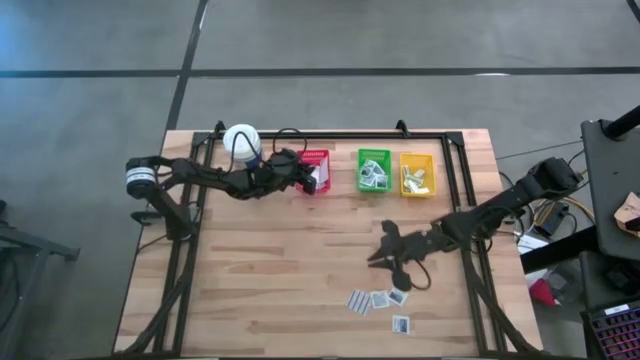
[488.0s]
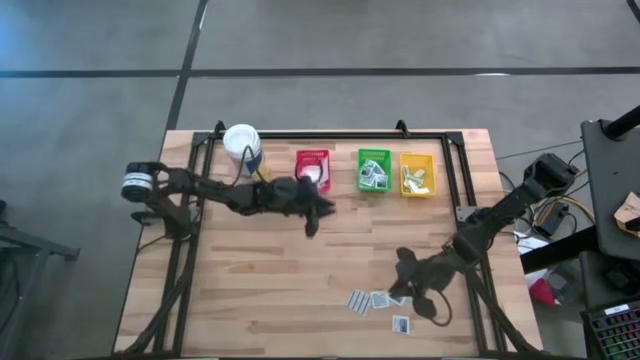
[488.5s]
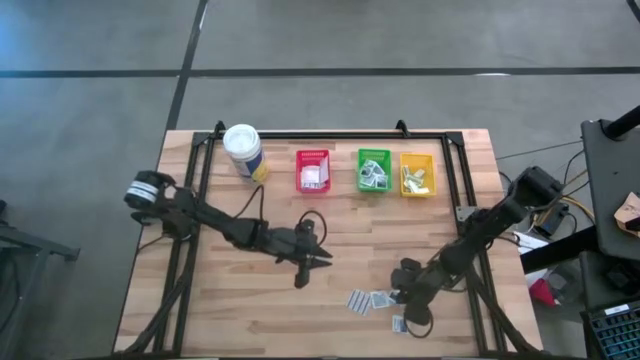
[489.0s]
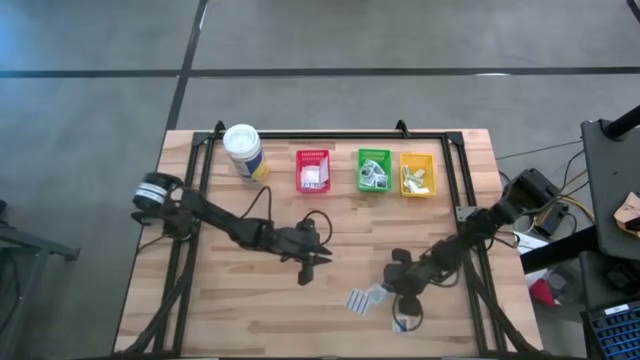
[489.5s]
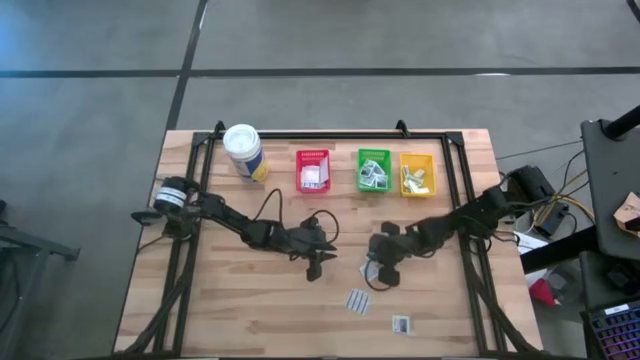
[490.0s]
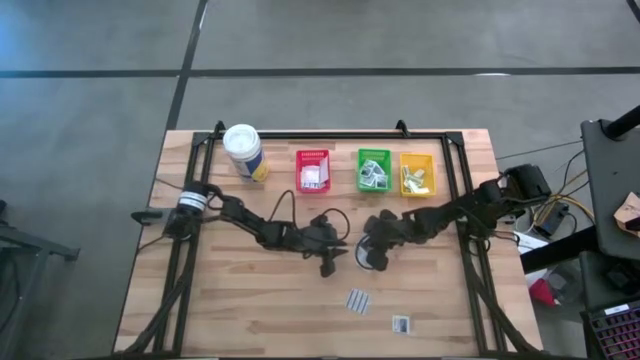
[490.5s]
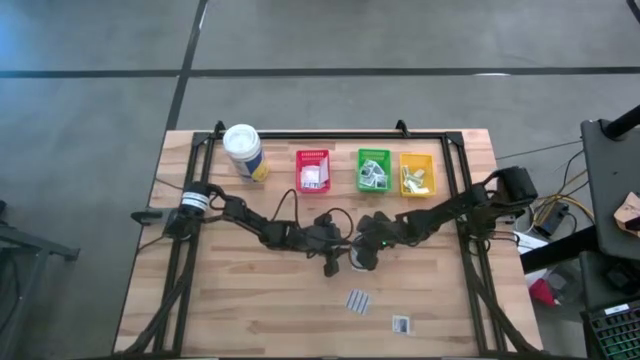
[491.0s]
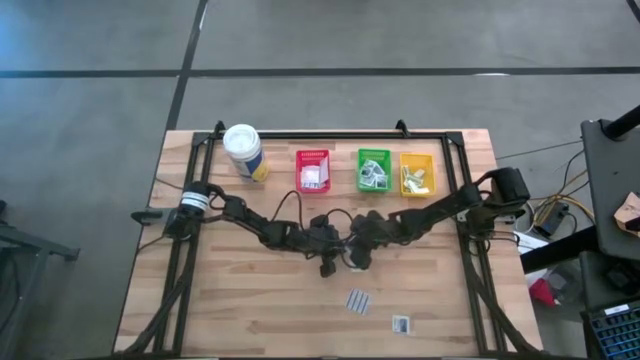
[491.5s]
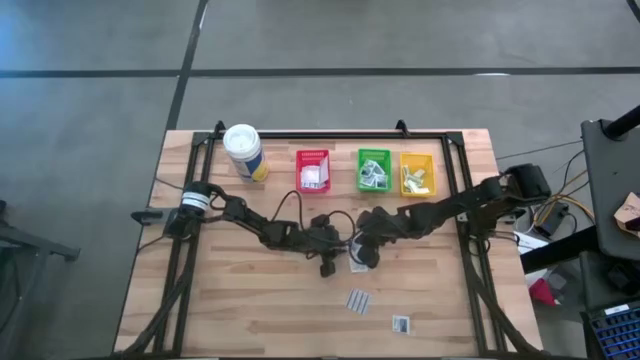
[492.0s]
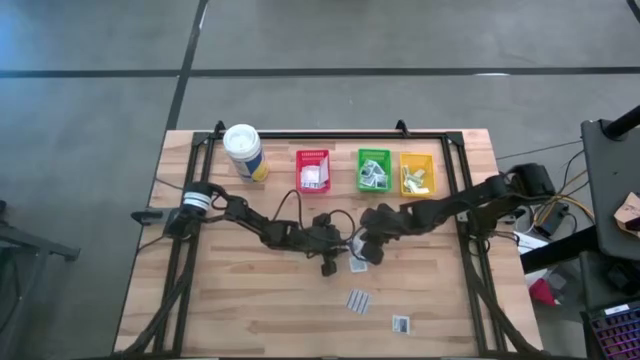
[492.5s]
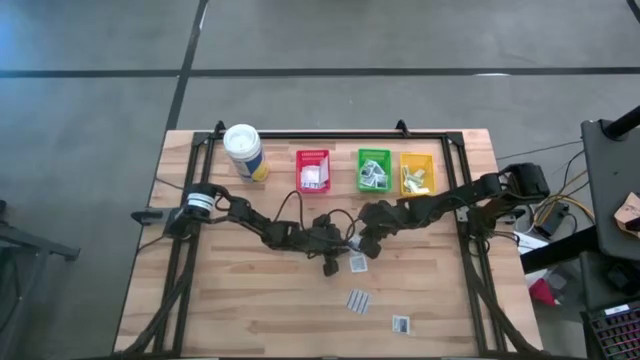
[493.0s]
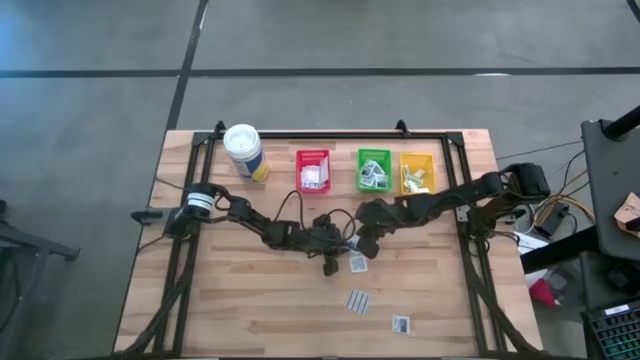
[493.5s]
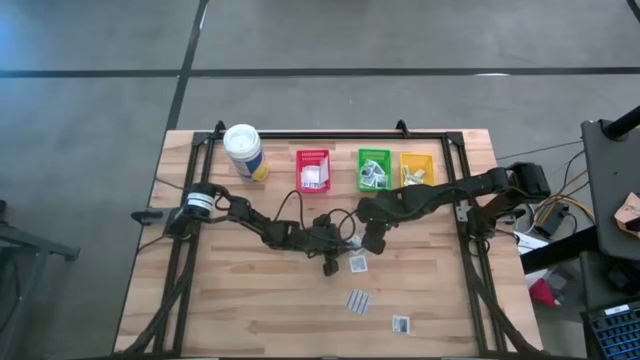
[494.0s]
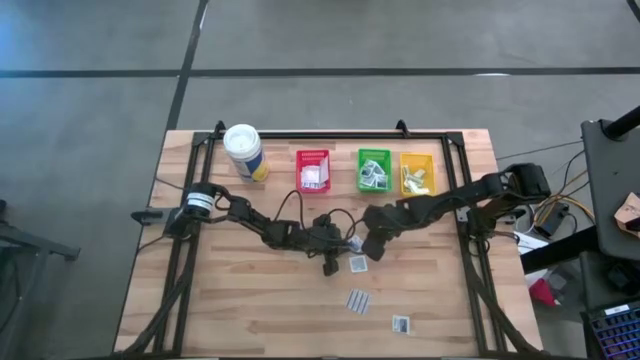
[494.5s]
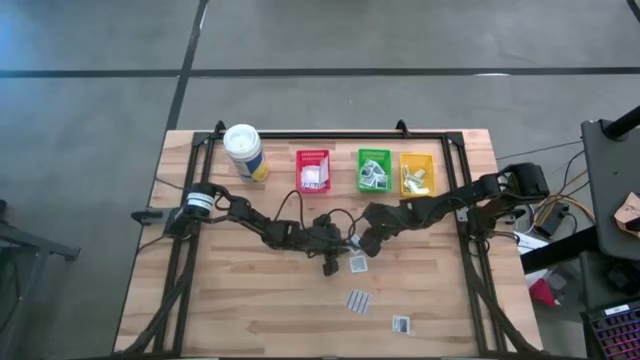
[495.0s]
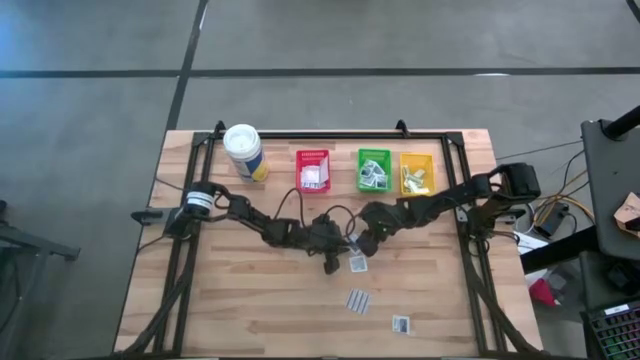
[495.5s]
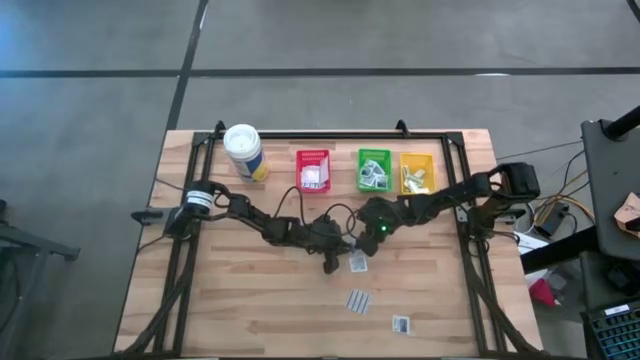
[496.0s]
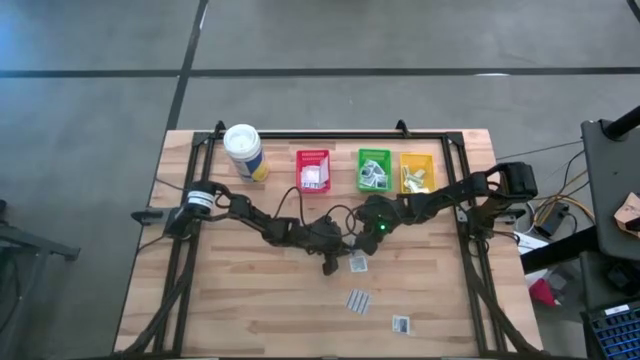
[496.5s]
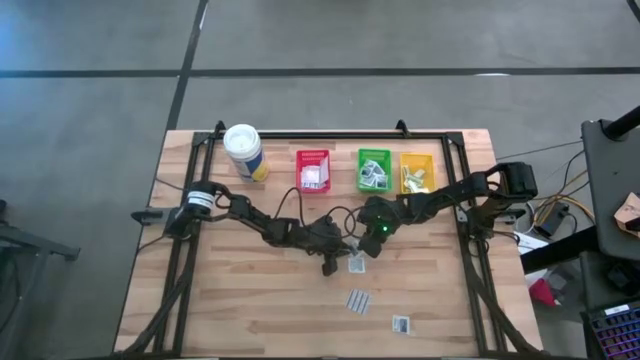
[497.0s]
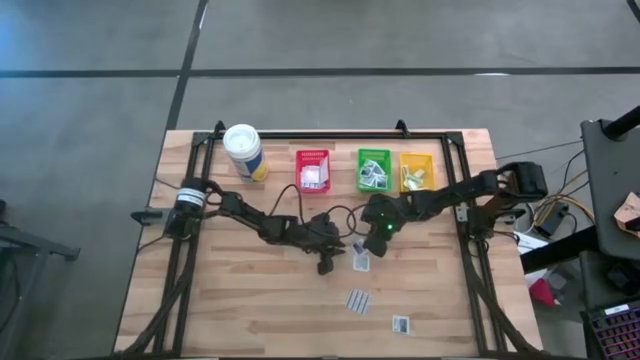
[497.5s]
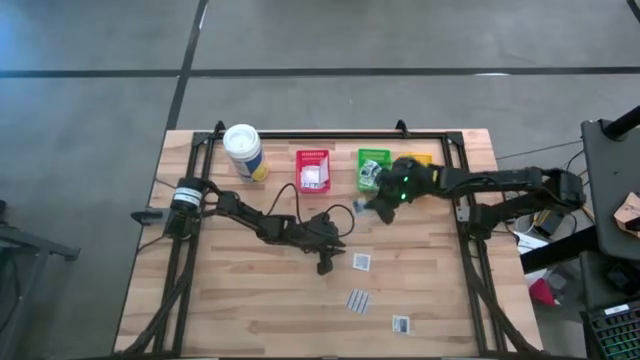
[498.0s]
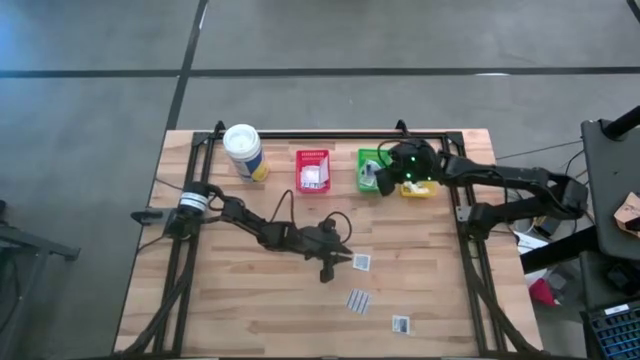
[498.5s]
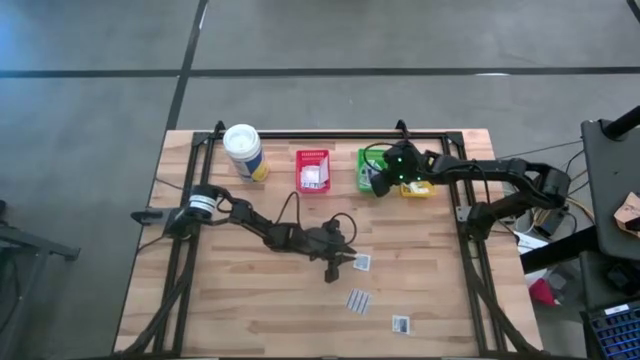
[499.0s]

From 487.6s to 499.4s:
Task: Pick & Place First Aid Supplies
Put the alcohol pad in the green bin

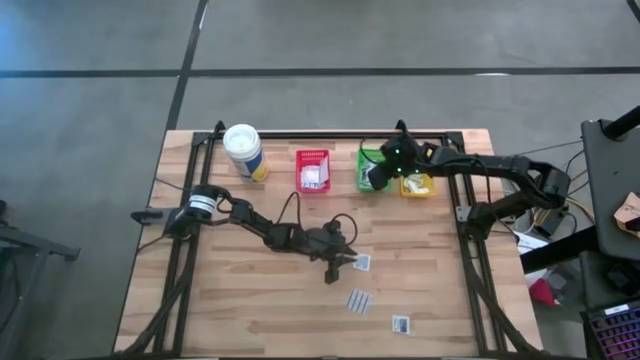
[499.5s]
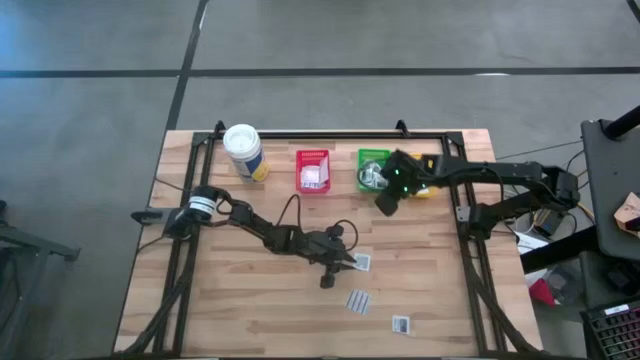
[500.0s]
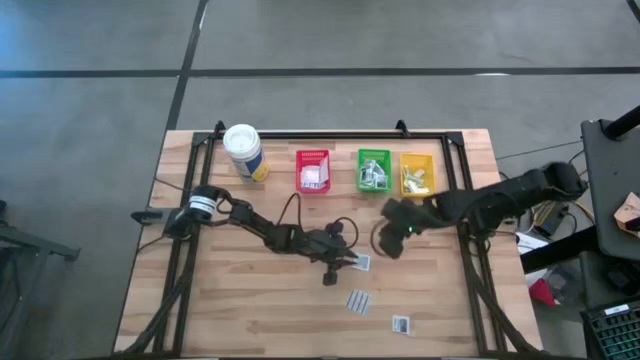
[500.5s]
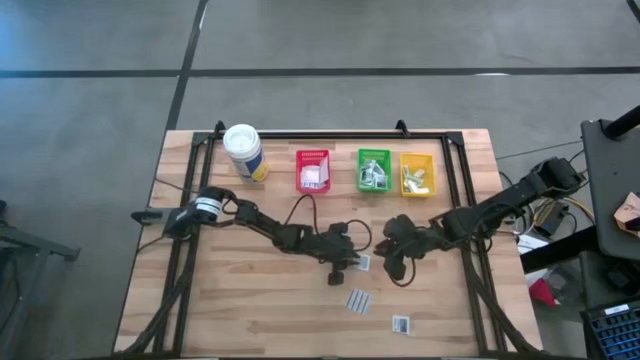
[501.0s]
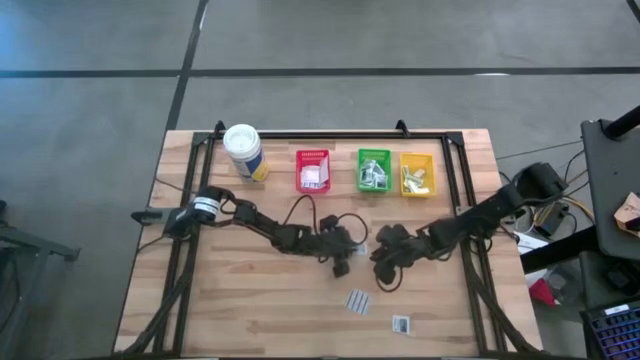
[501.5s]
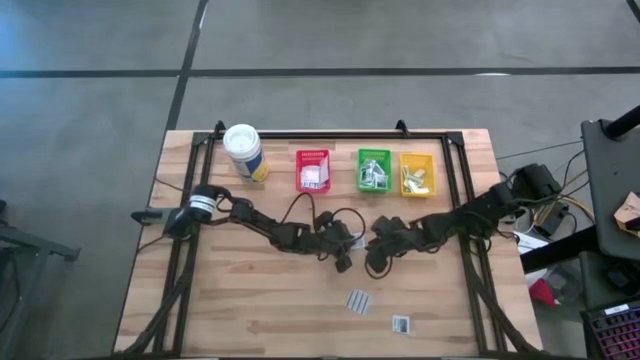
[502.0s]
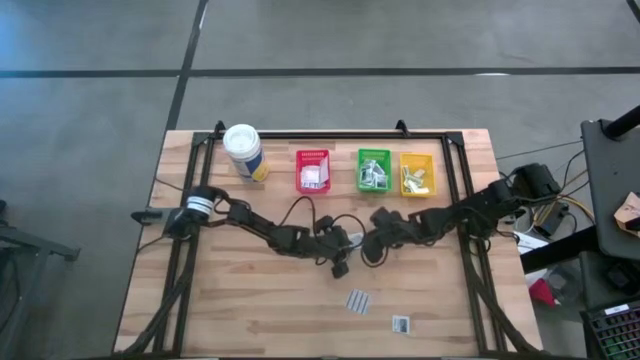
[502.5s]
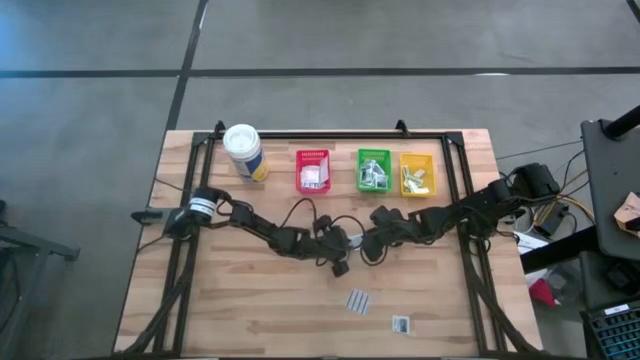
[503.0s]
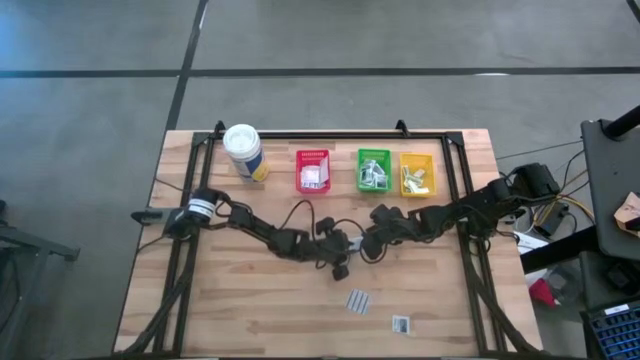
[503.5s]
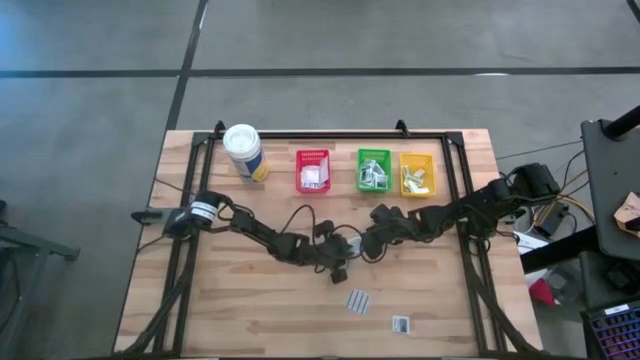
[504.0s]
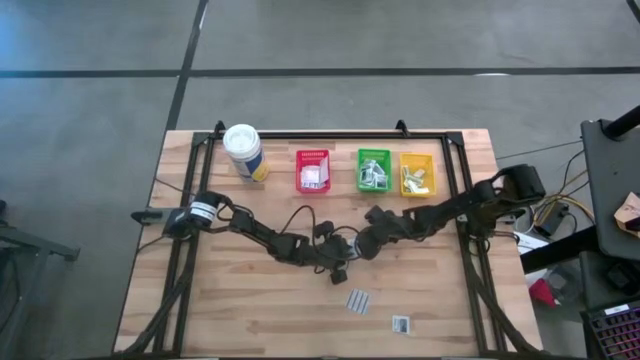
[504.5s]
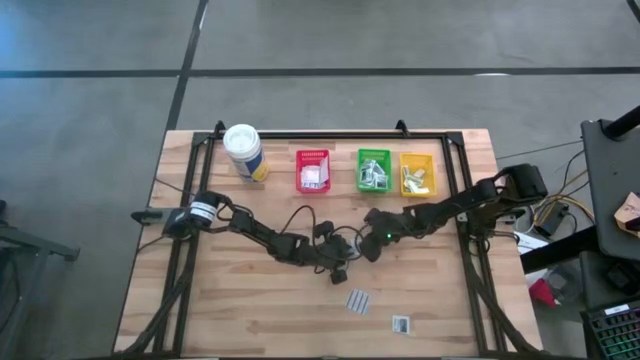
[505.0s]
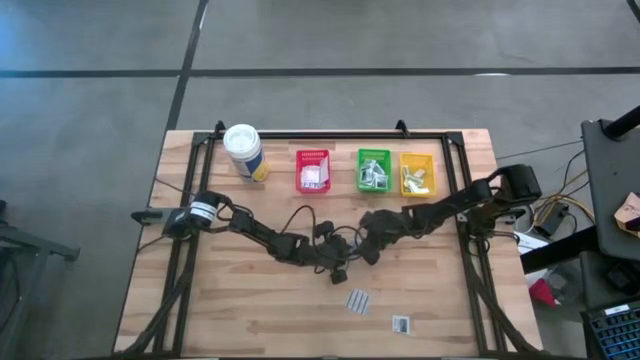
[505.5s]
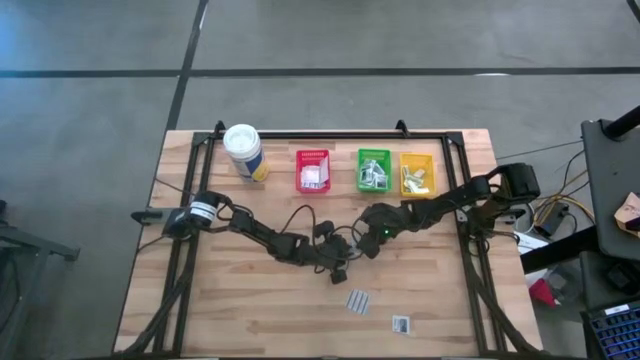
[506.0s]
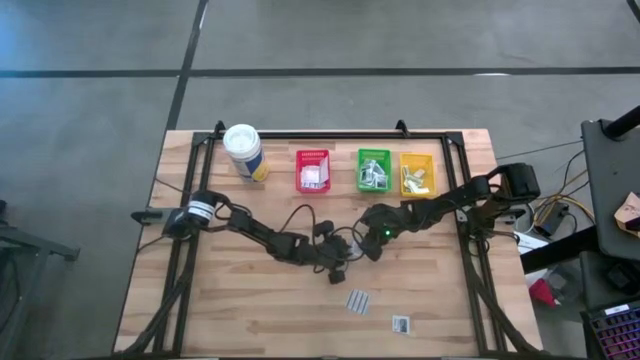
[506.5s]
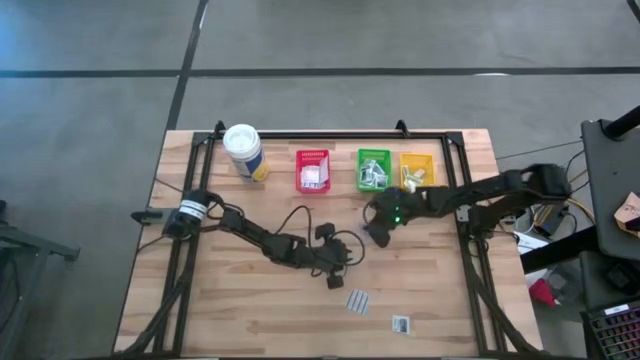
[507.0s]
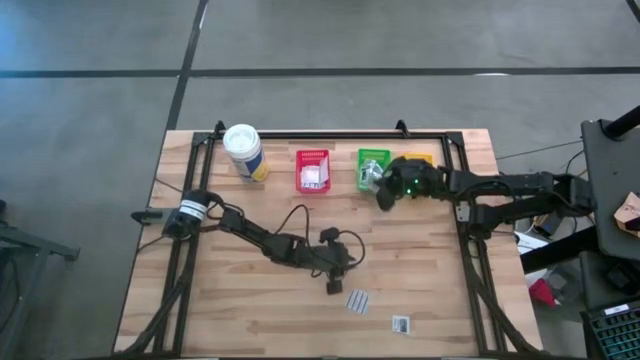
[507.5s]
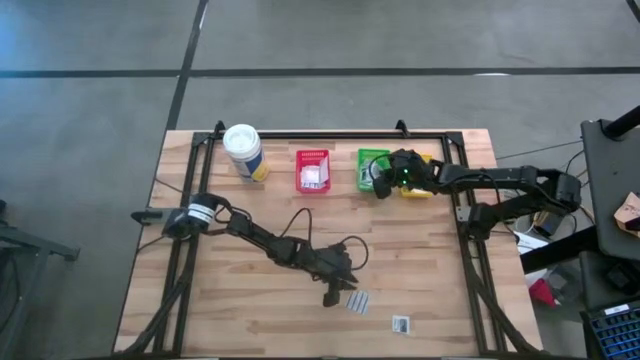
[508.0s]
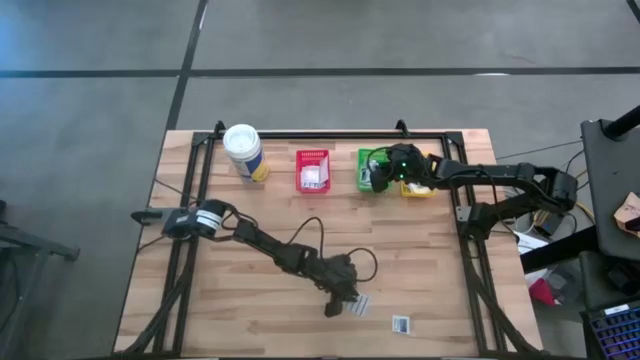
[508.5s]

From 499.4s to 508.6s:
Put the alcohol pad in the green bin
